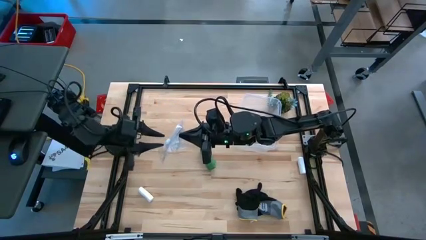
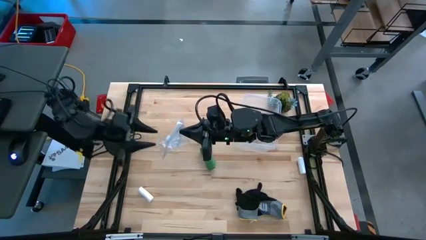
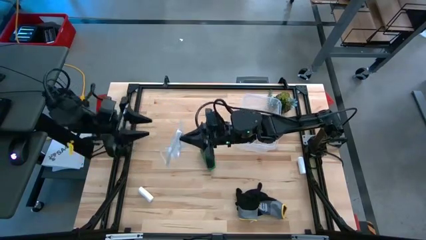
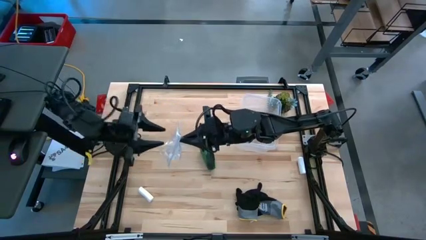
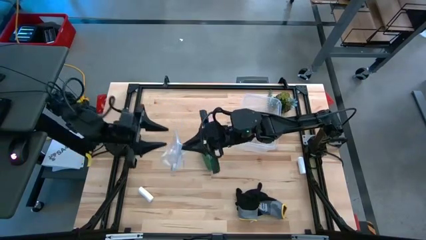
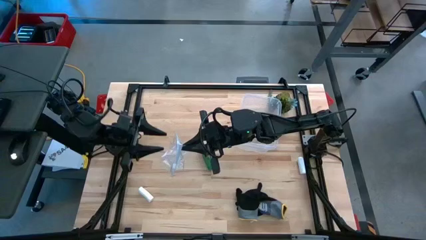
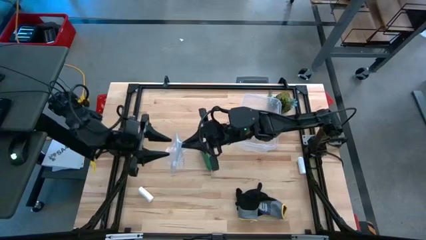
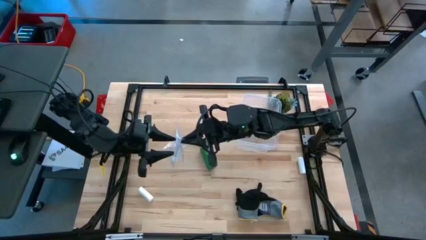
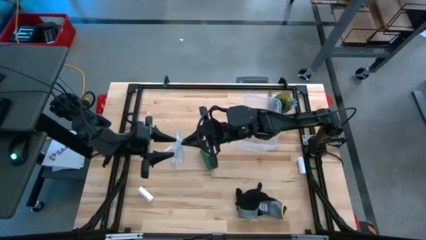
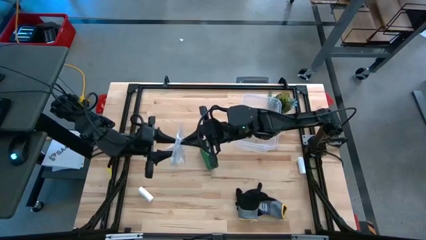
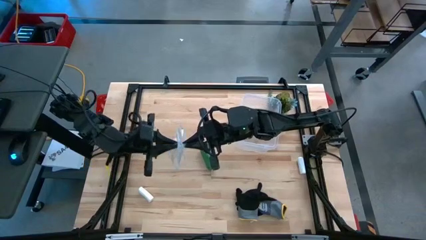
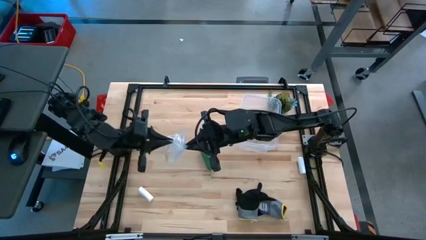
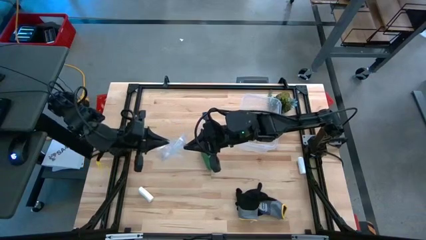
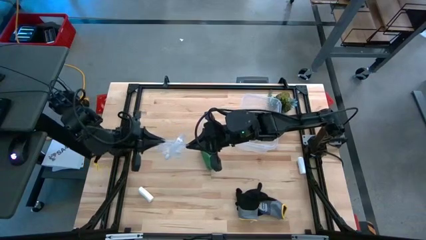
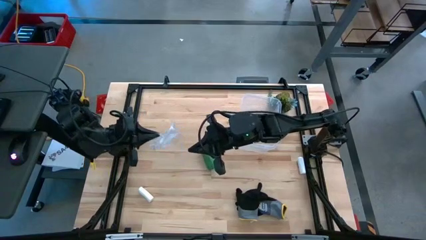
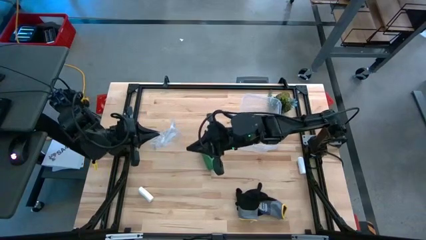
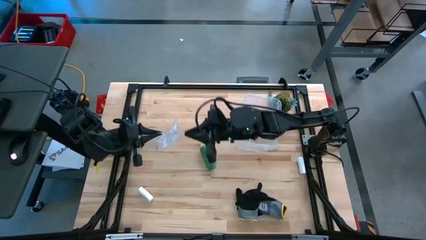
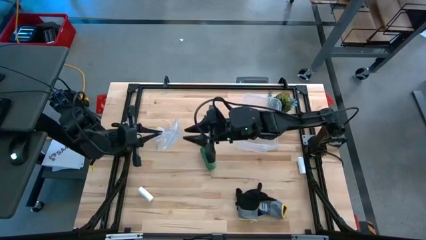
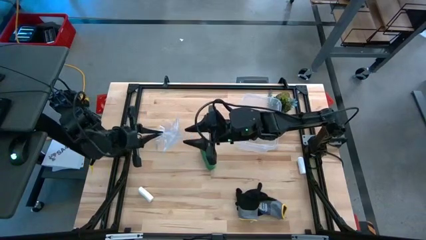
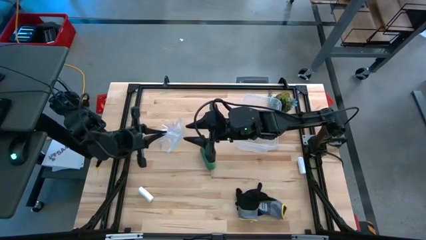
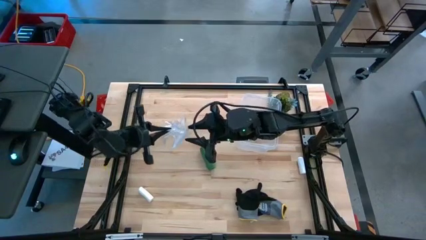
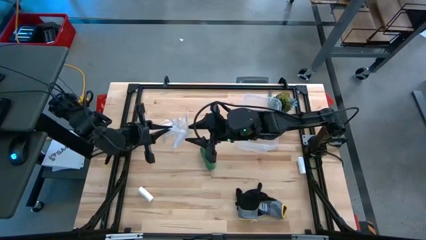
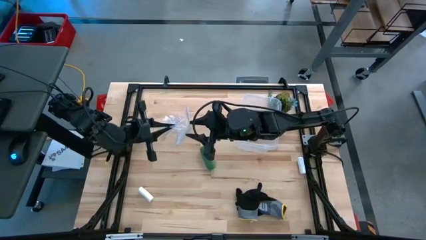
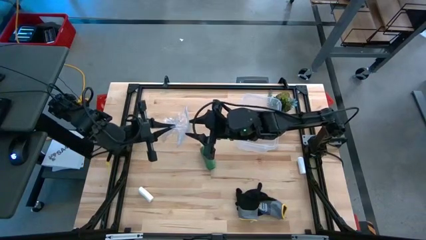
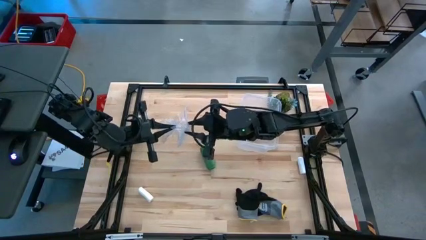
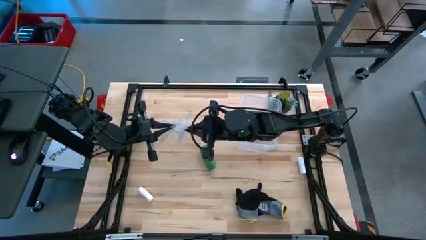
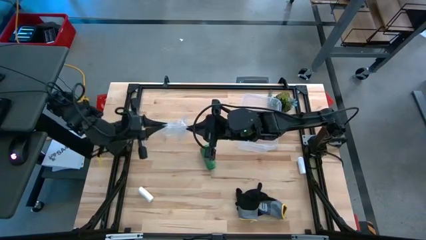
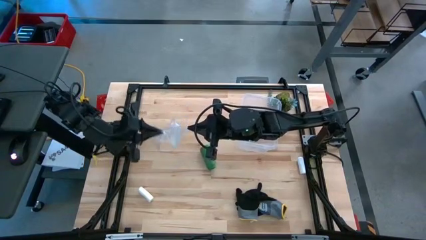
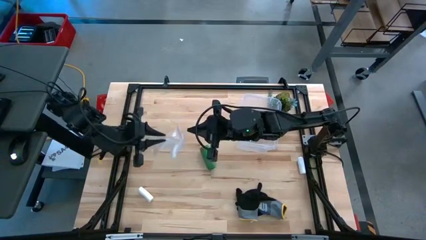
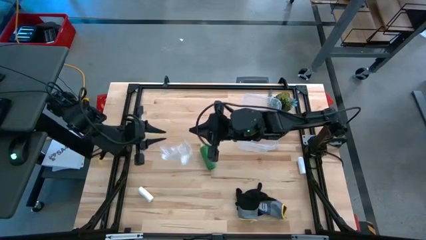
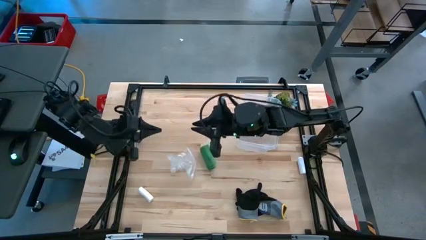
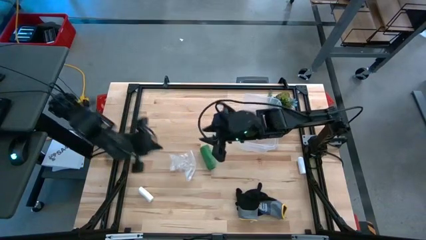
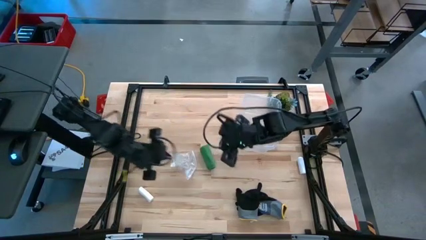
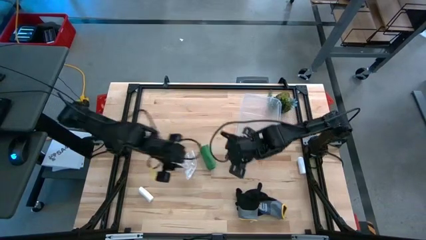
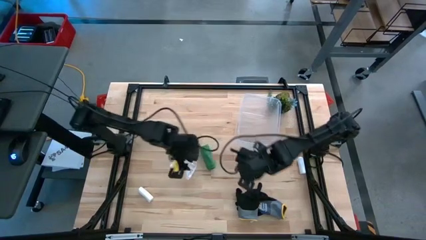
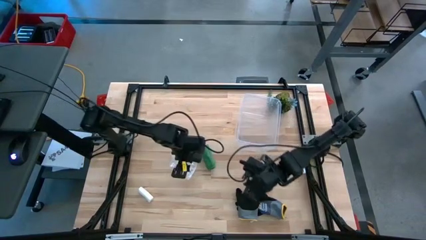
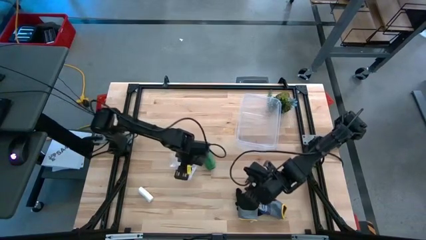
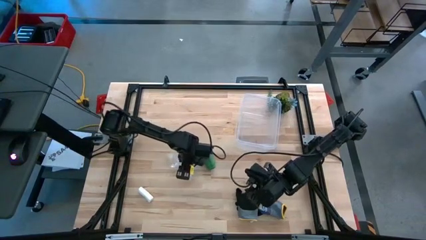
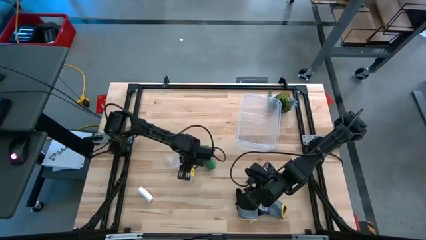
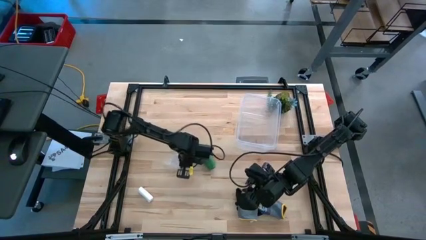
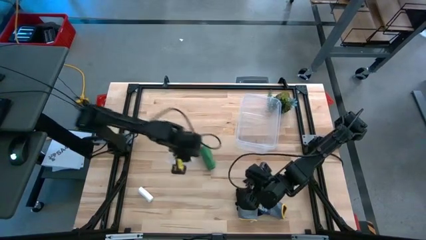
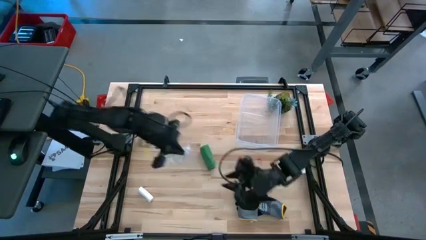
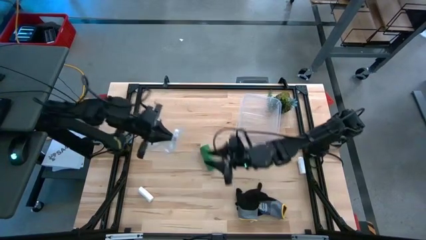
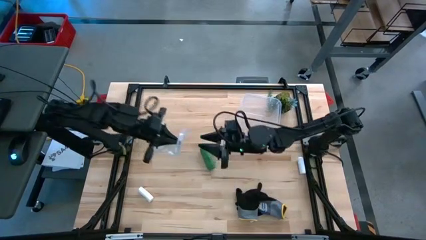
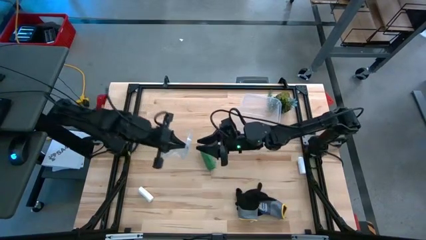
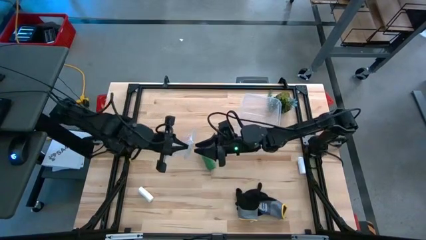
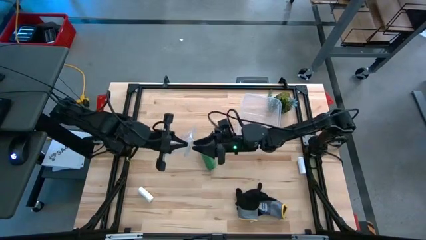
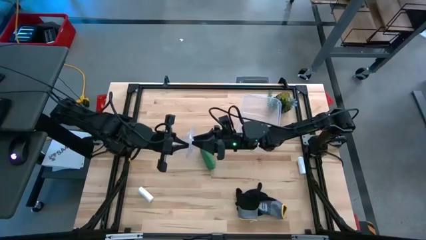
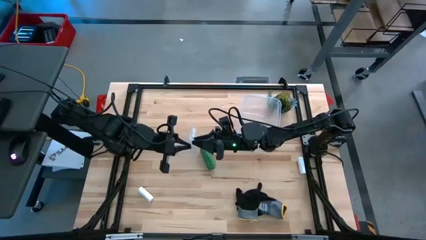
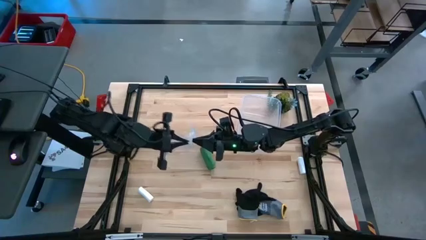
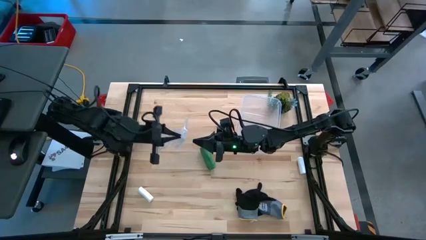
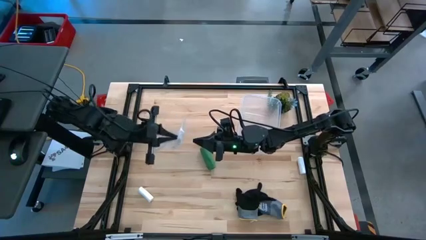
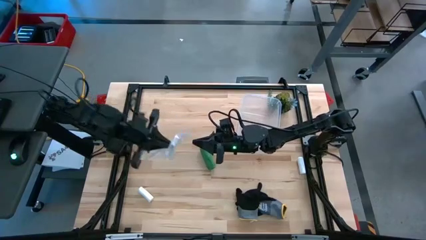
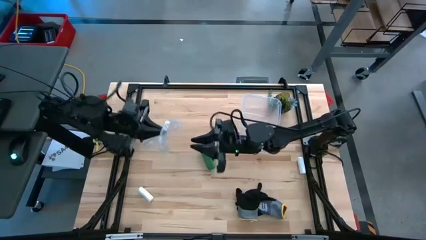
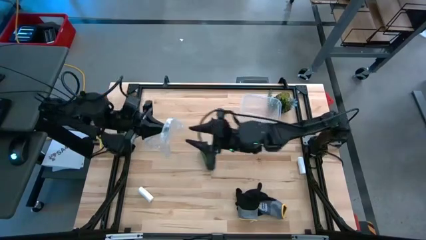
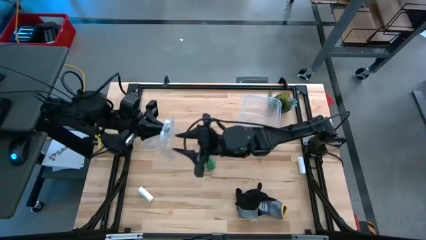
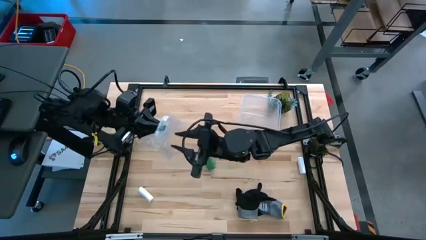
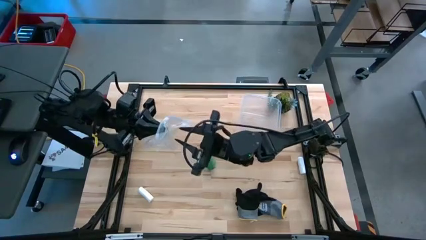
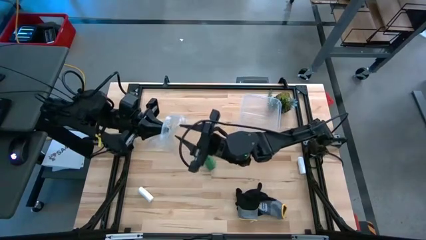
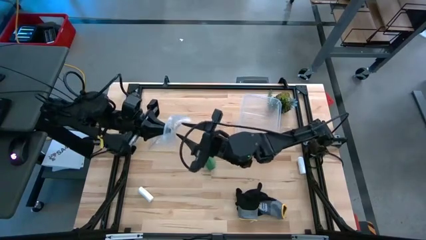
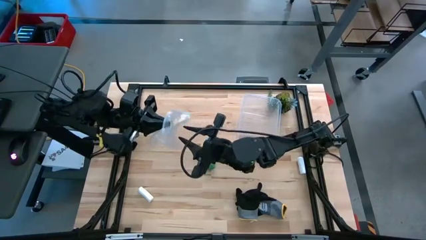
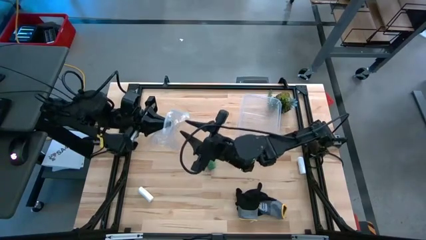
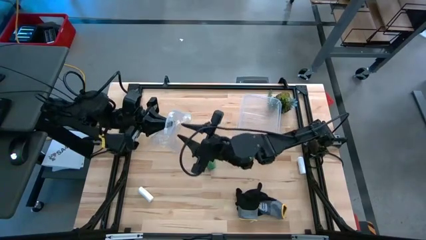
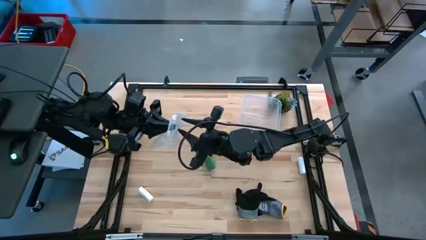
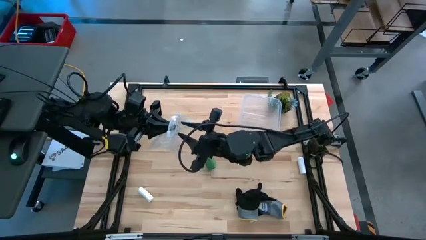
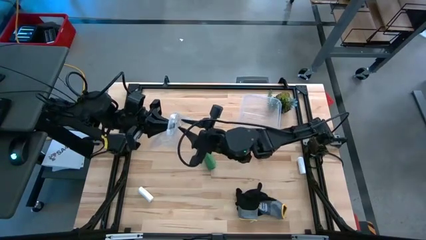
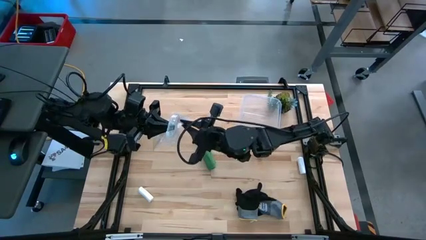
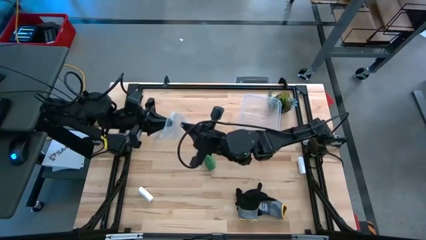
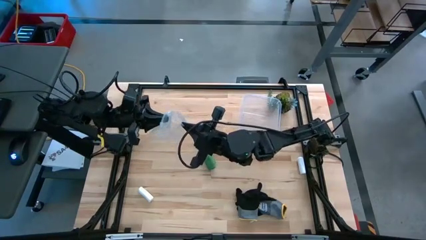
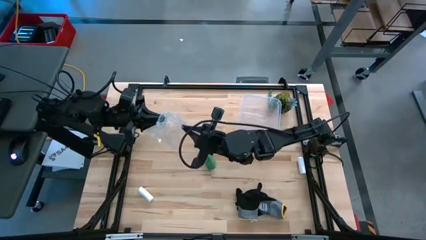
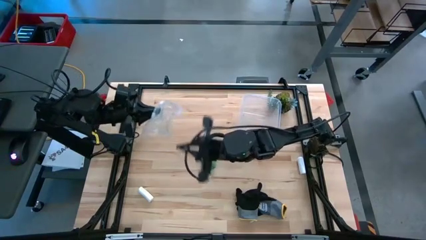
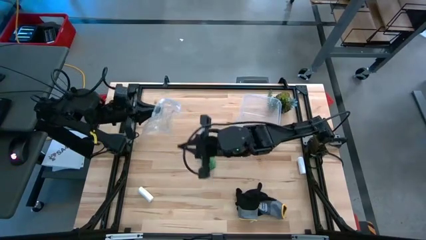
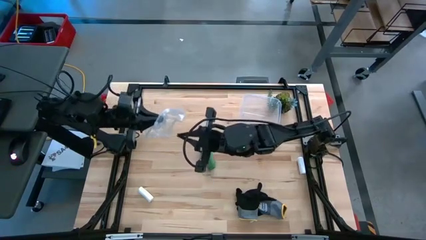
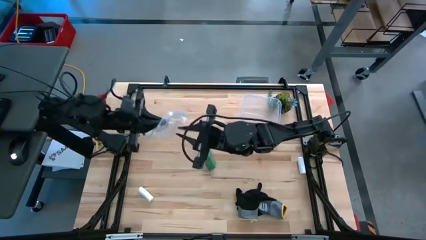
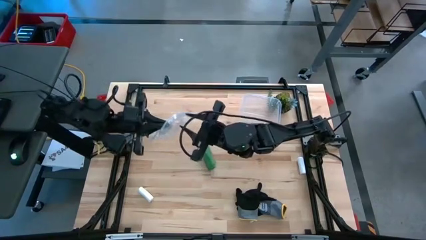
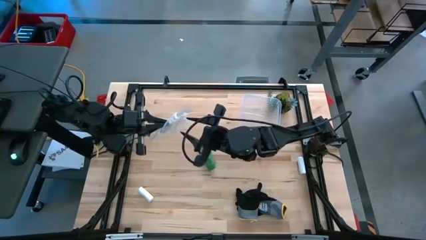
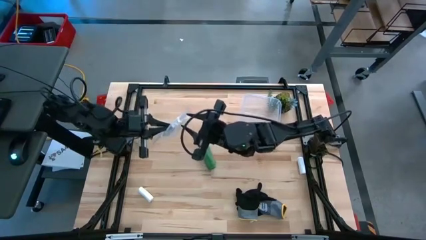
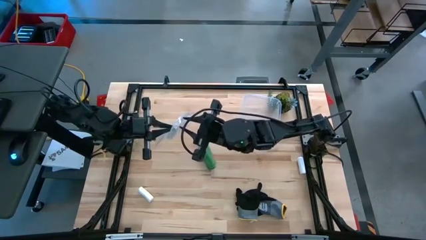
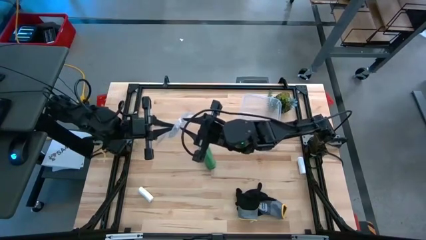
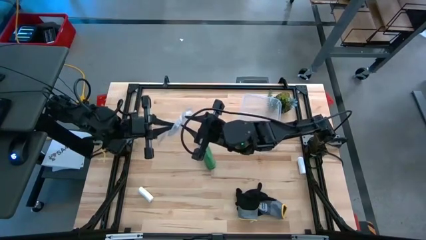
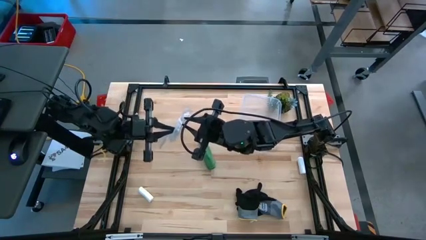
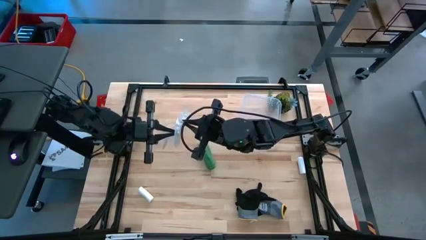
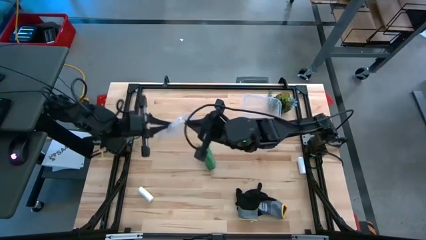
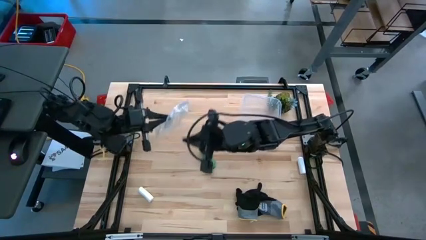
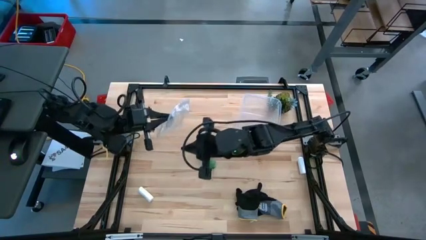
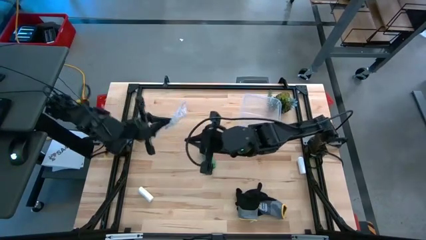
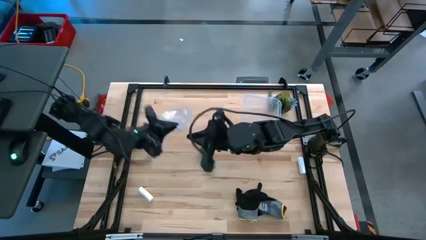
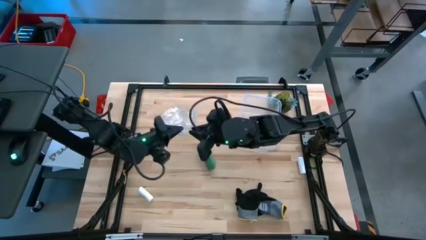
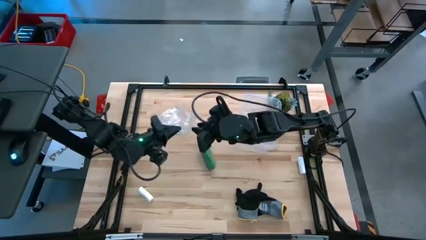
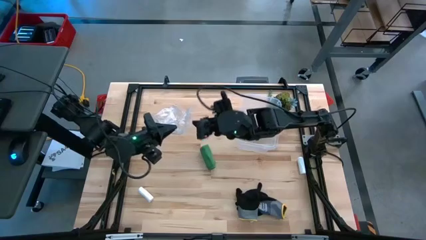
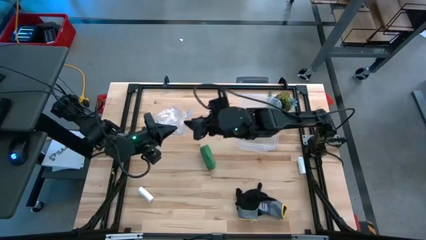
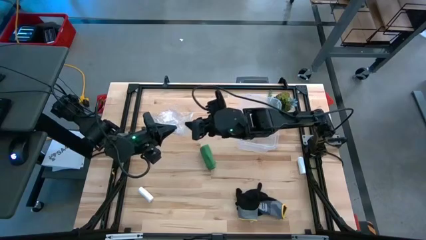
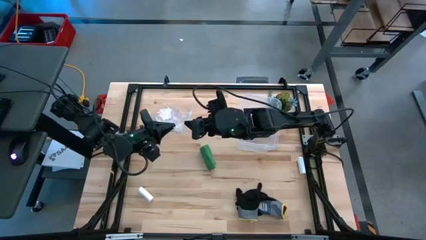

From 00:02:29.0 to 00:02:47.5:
Task: Roll bandage
Open the transparent zip bag
